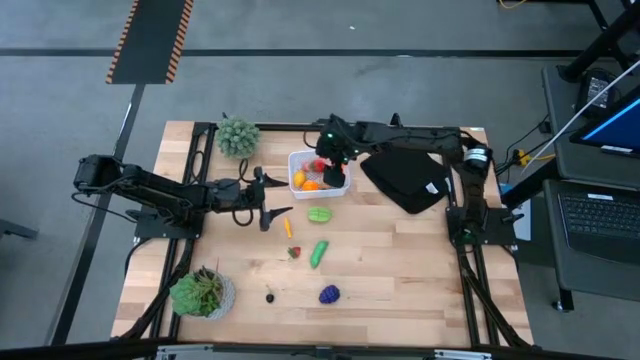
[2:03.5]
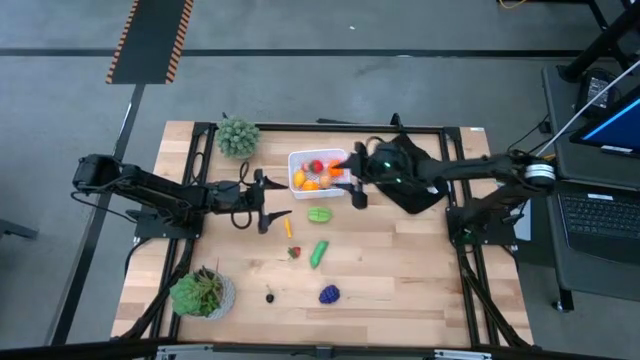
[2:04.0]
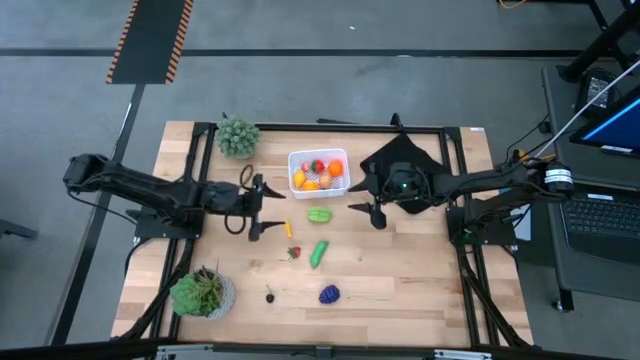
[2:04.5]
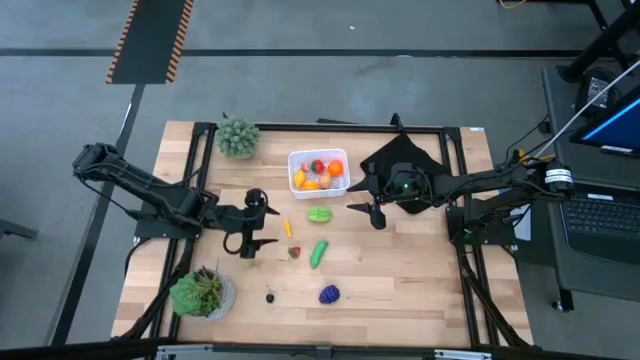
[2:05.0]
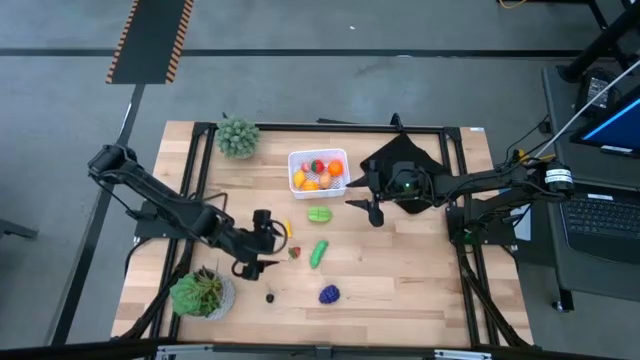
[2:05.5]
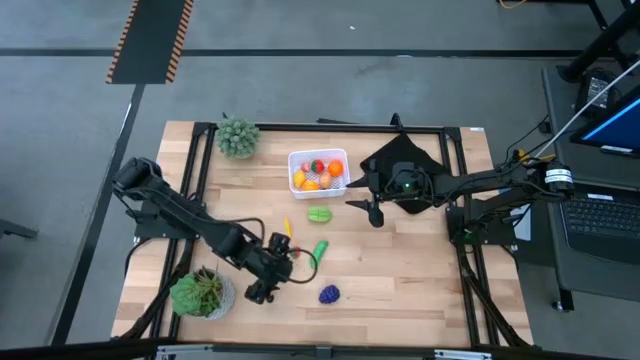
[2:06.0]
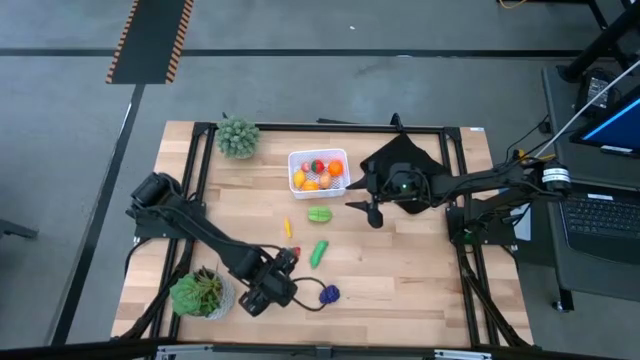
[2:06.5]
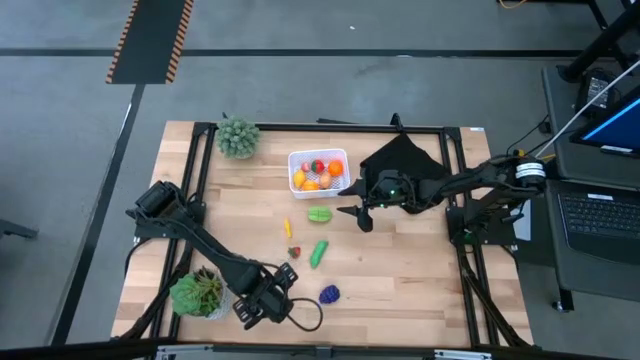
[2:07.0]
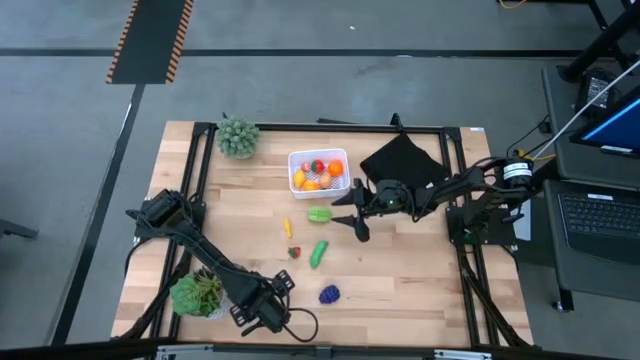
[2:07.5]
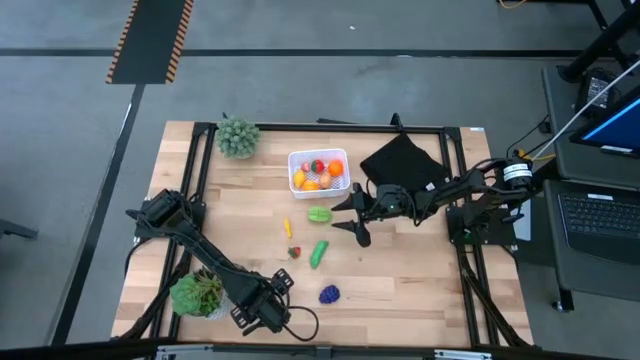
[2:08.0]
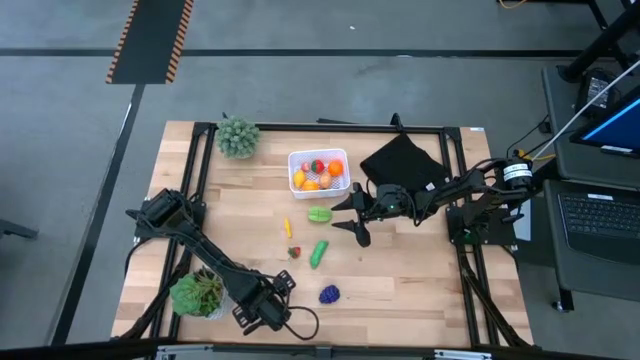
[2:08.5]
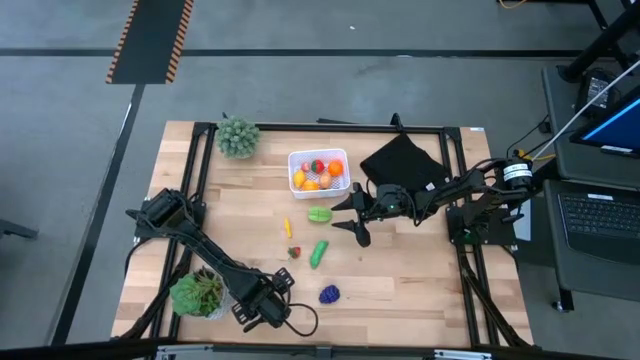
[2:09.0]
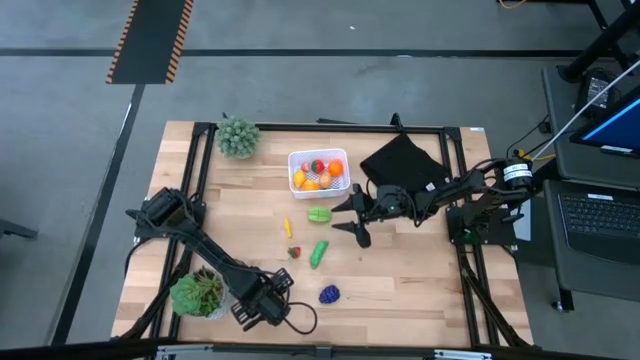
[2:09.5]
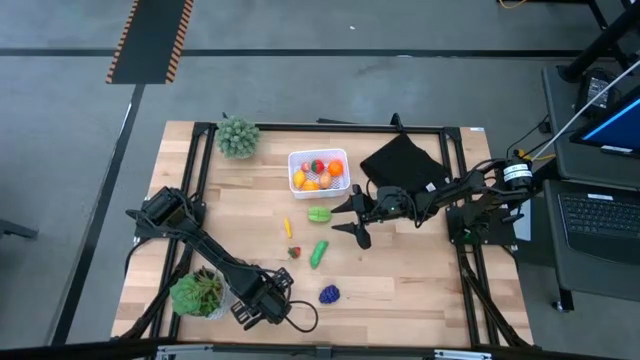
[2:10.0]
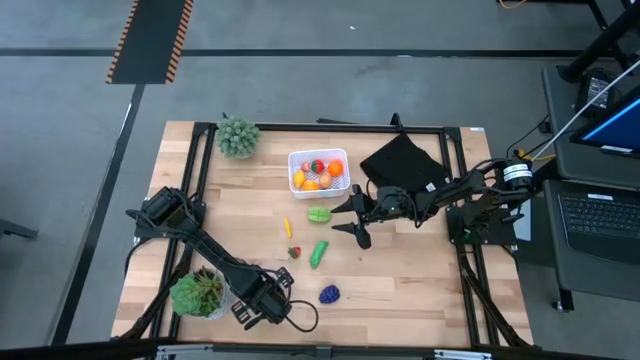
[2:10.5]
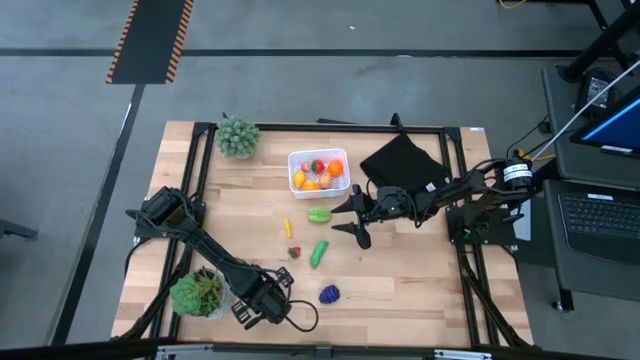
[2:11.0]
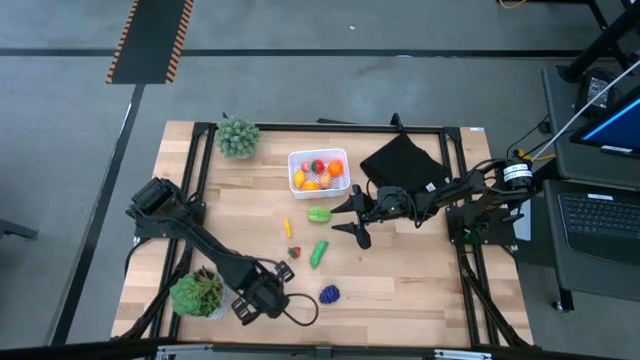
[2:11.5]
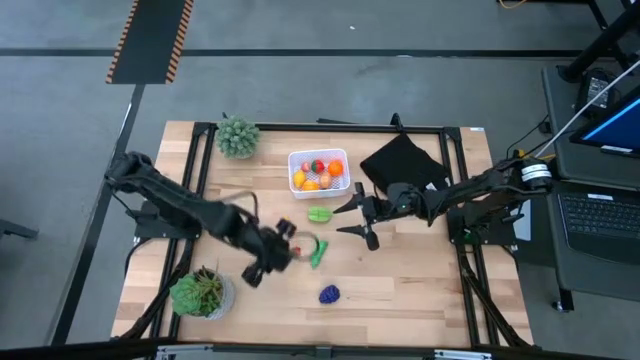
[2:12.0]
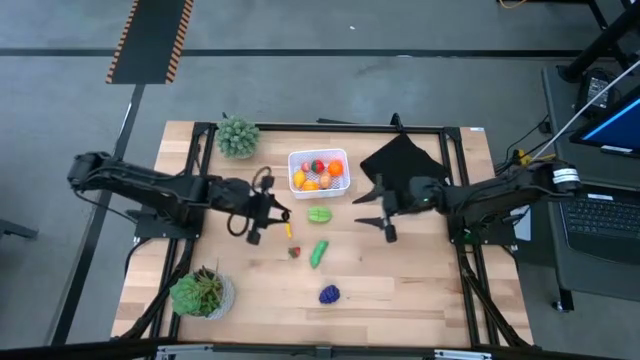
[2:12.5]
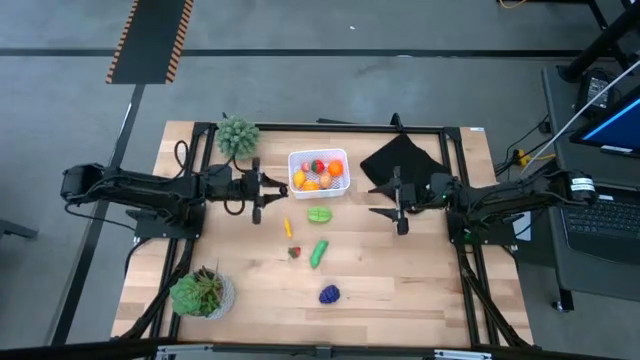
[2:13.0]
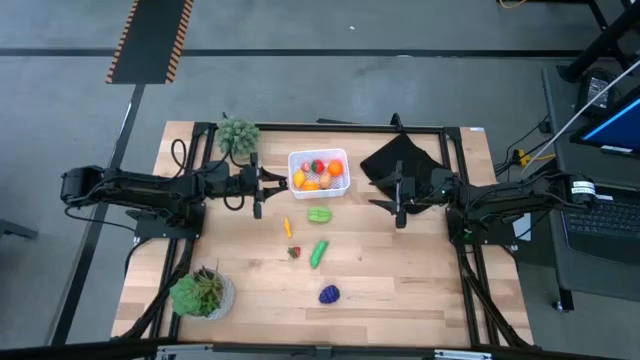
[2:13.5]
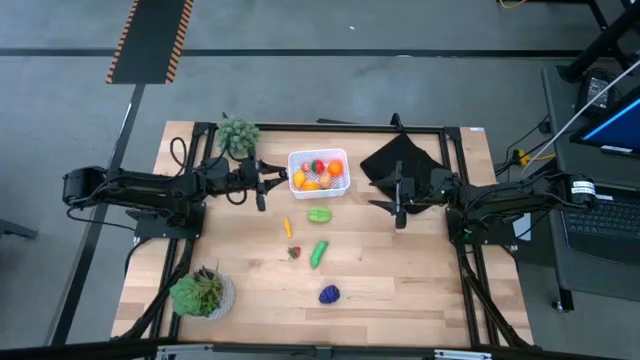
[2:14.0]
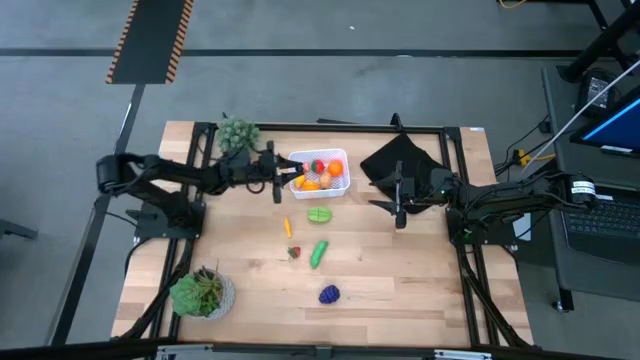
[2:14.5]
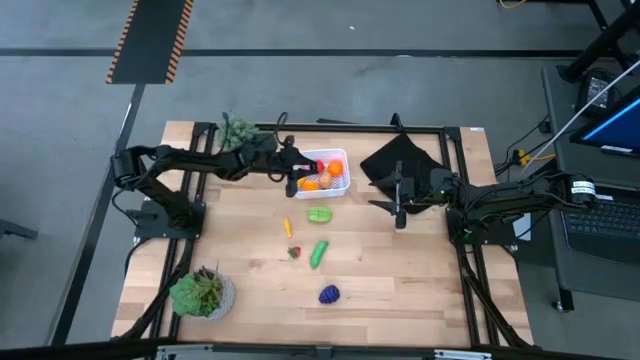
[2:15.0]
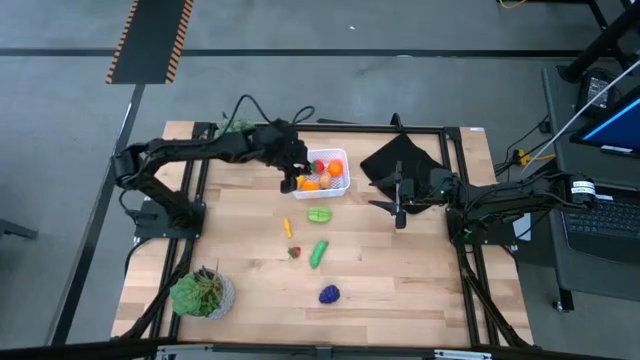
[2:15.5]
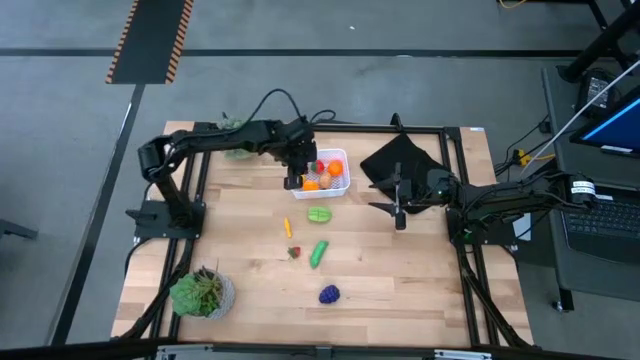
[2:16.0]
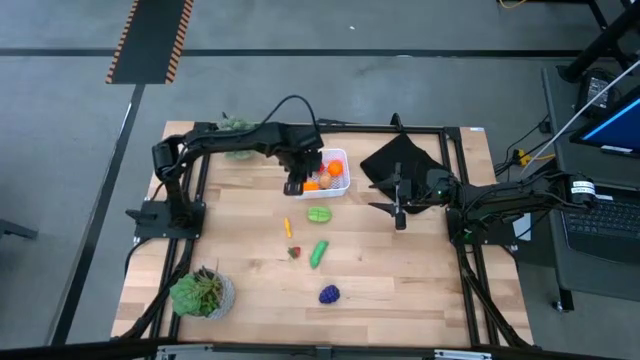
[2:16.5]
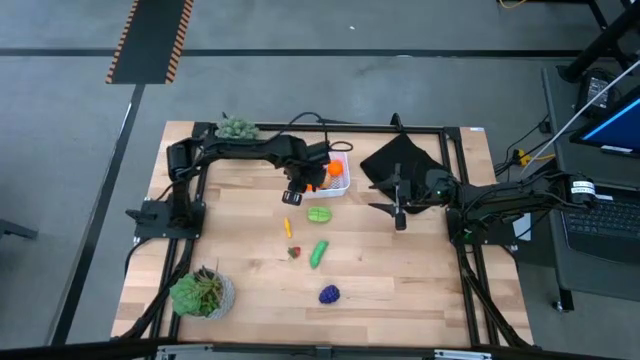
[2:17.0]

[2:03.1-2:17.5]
Task: Pick and placing Produce into tupperware
Put the cherry into the white bin

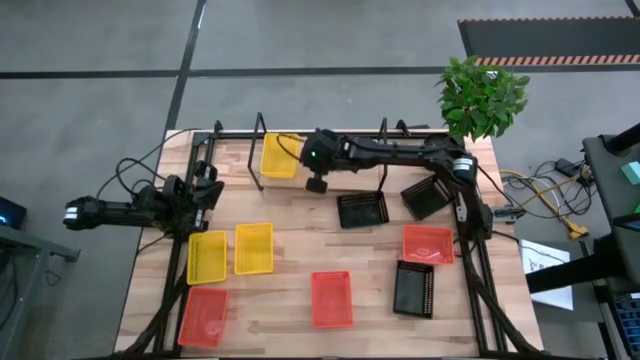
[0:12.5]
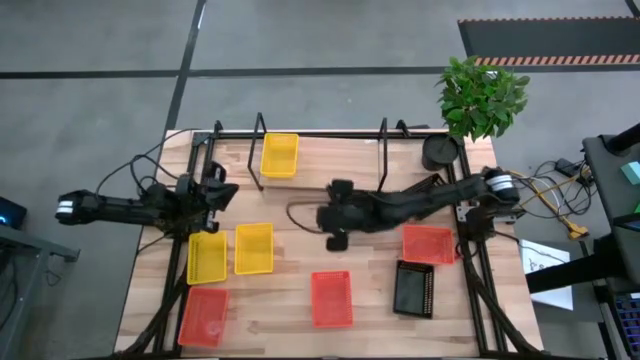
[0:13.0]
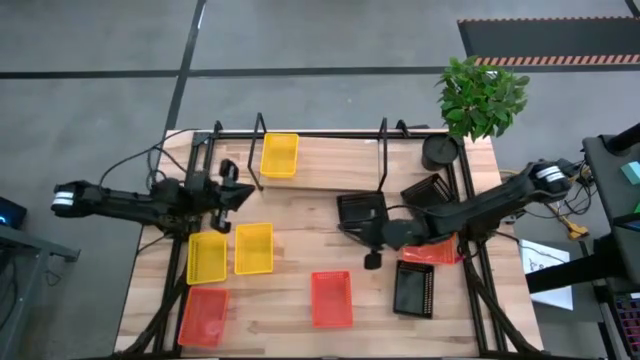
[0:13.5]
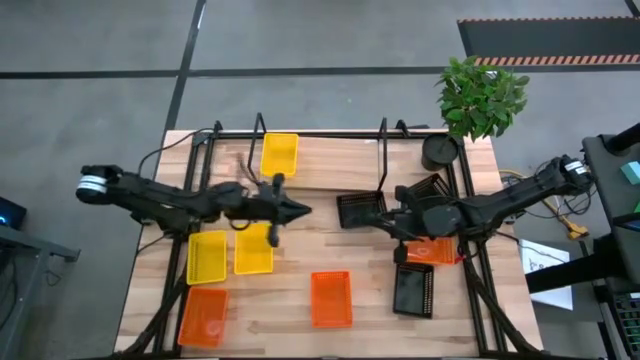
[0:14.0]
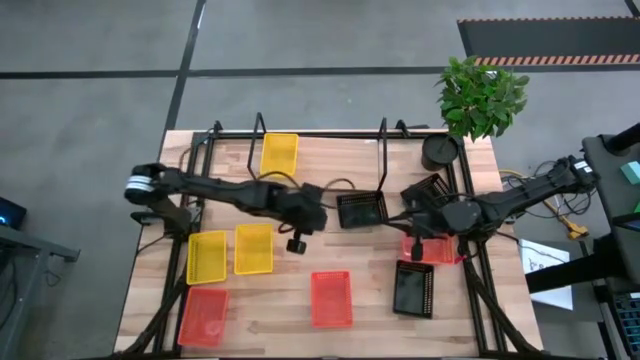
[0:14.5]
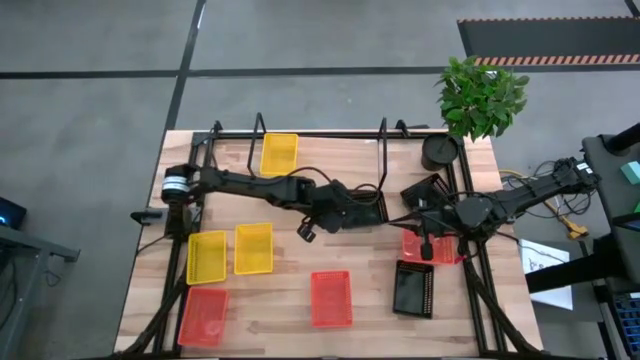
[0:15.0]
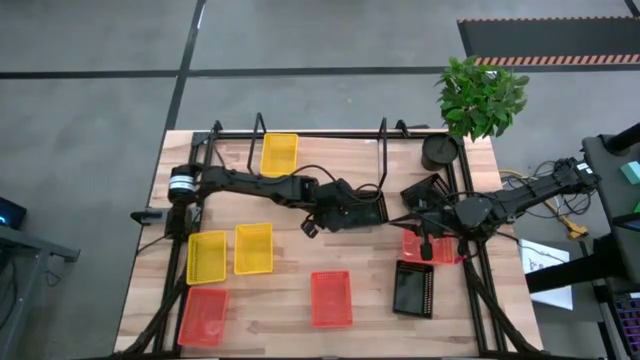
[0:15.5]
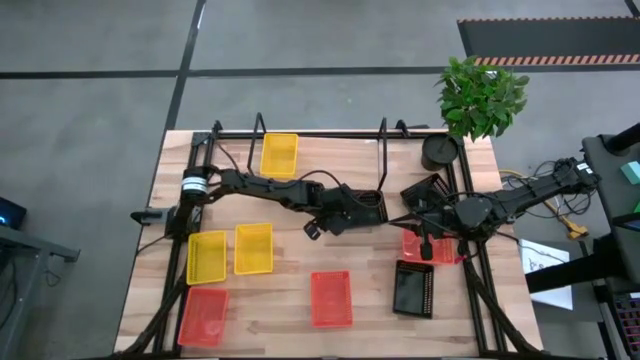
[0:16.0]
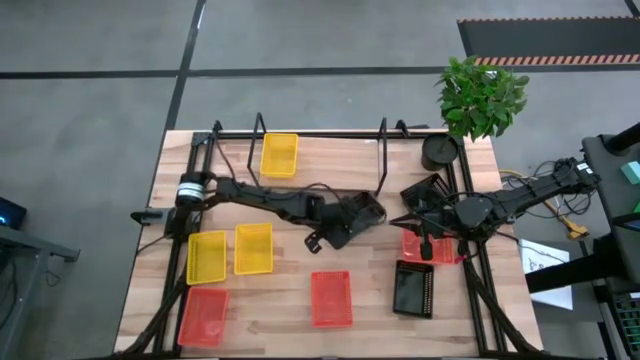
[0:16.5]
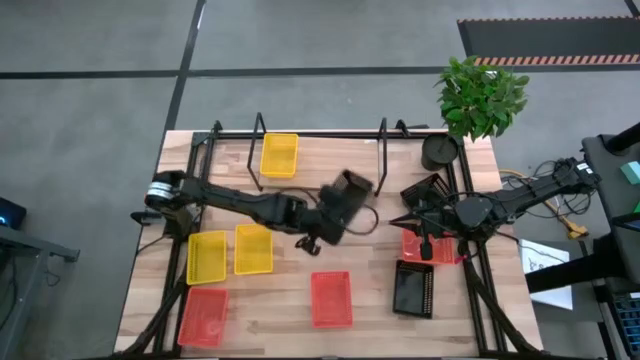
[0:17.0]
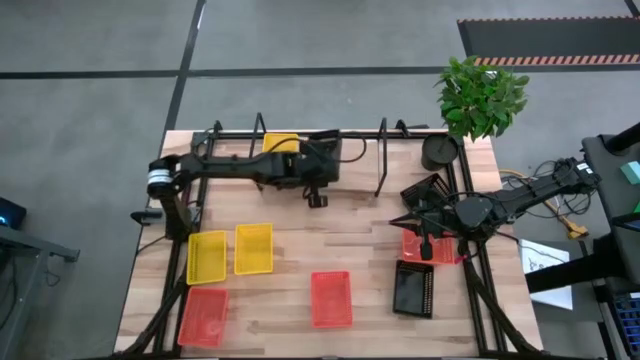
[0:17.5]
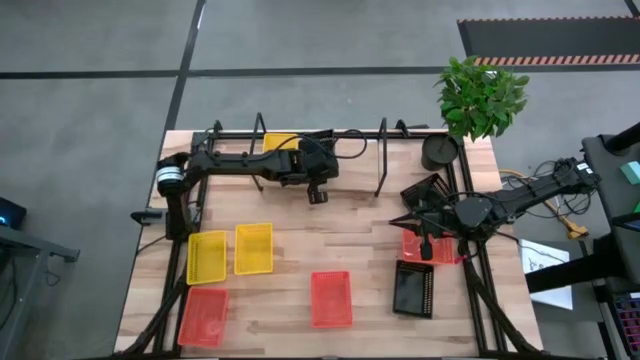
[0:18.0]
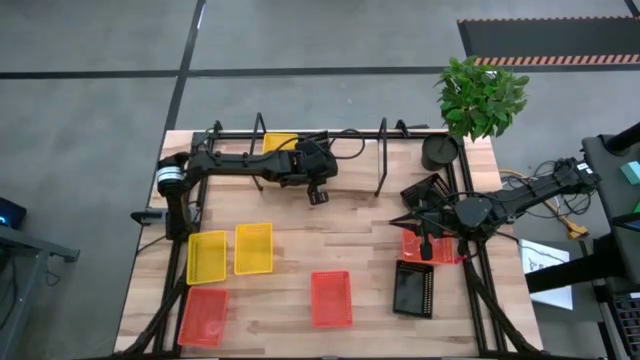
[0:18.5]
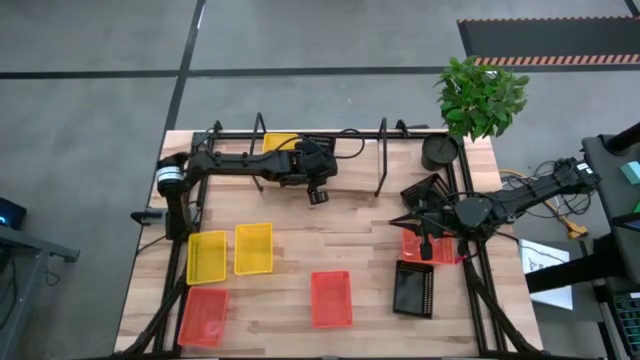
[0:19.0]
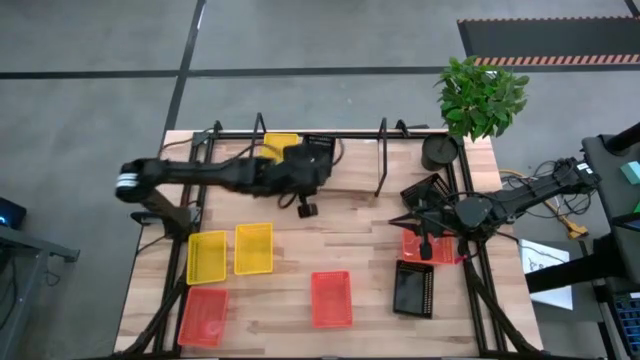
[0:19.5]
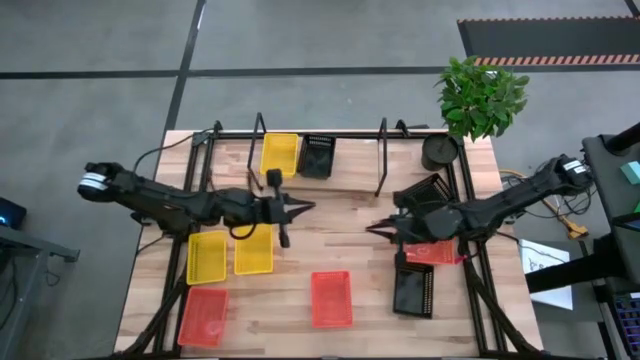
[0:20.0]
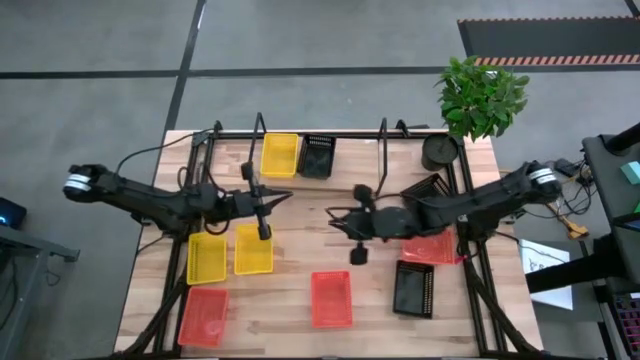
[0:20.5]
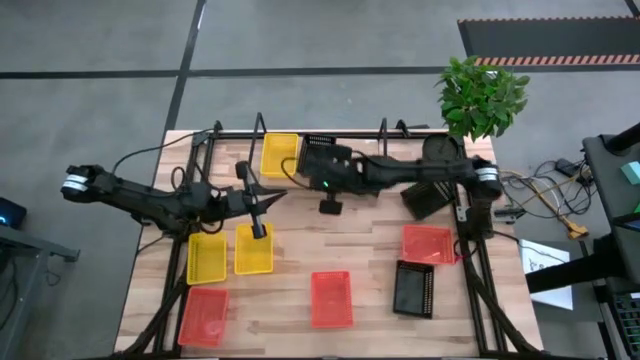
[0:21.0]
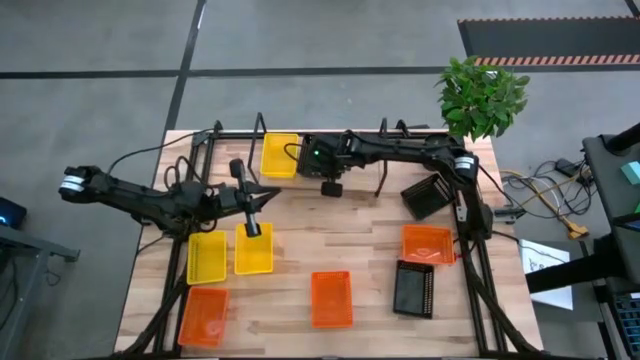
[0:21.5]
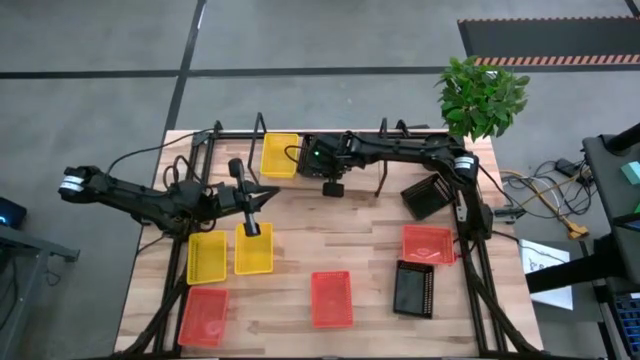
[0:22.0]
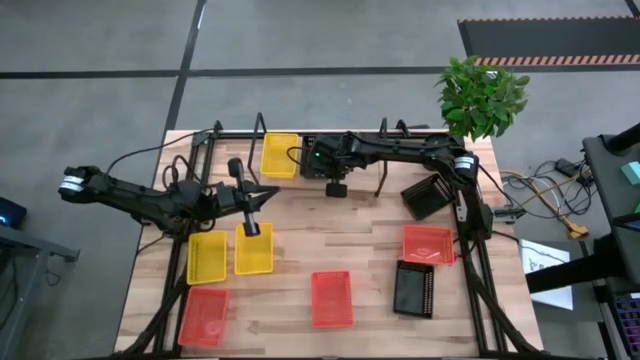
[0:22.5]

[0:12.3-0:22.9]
Task: Stack baskets on shelf by color
Put the top left black bin on the shelf
